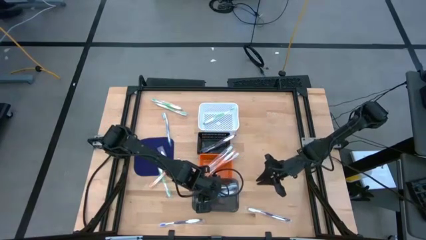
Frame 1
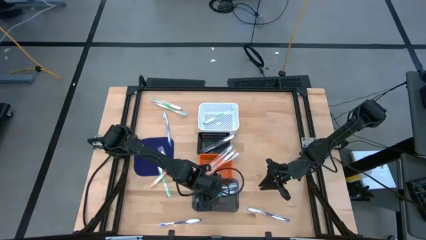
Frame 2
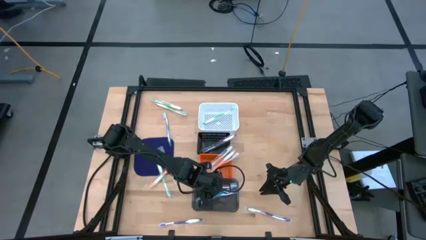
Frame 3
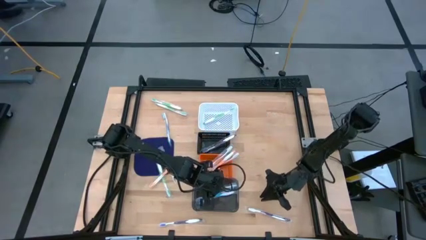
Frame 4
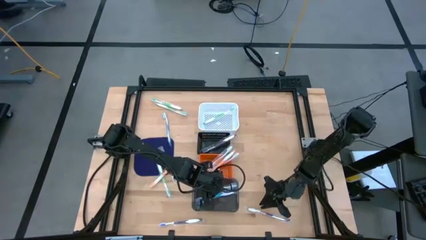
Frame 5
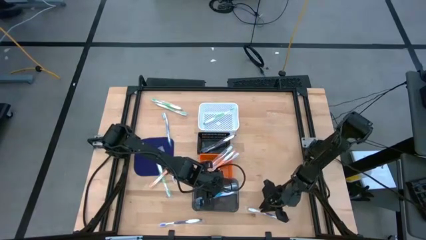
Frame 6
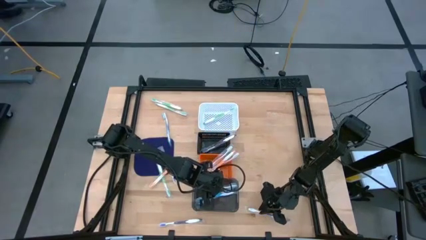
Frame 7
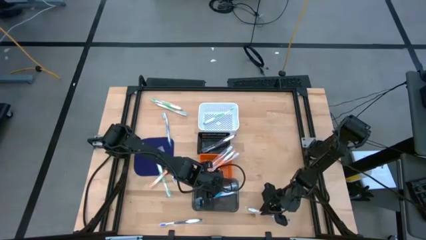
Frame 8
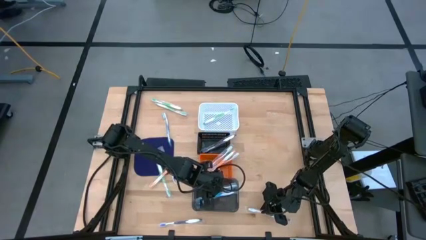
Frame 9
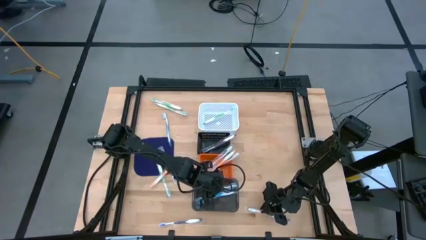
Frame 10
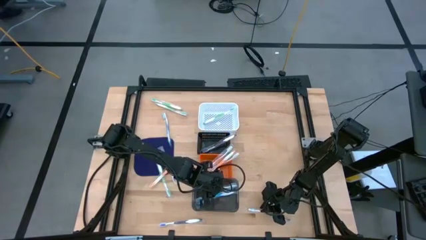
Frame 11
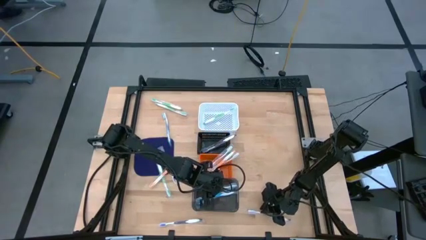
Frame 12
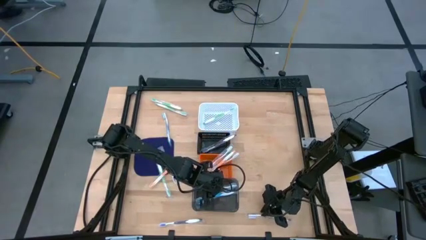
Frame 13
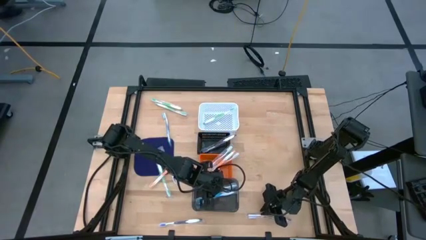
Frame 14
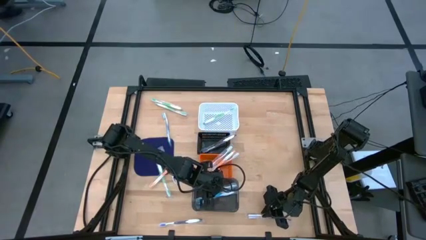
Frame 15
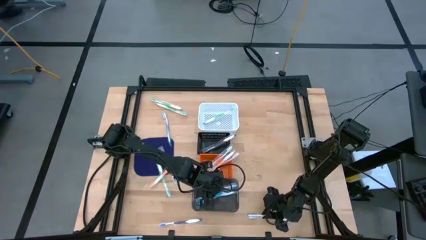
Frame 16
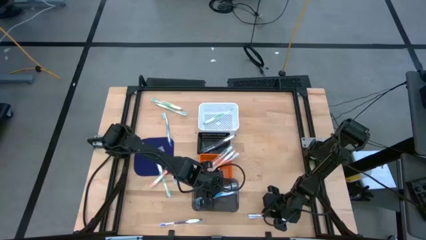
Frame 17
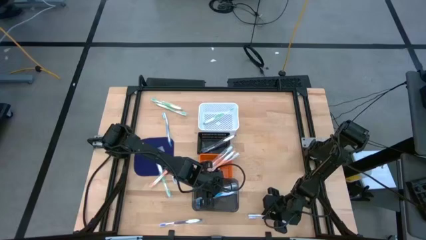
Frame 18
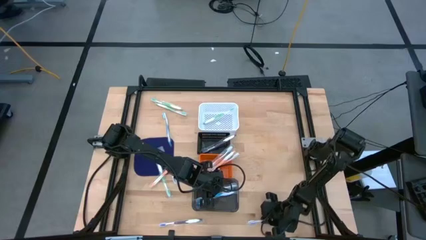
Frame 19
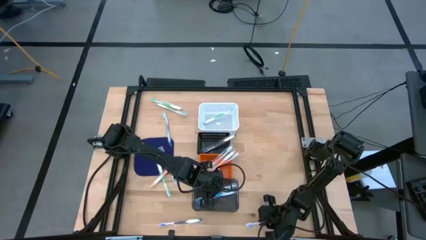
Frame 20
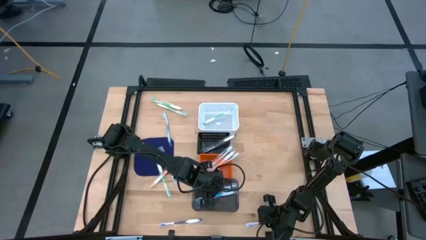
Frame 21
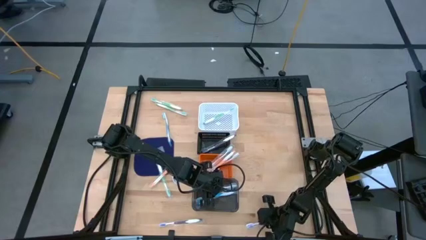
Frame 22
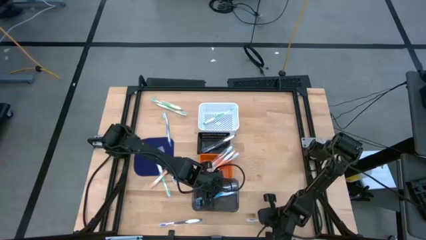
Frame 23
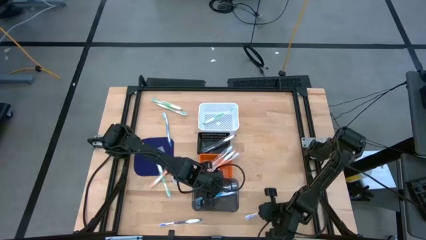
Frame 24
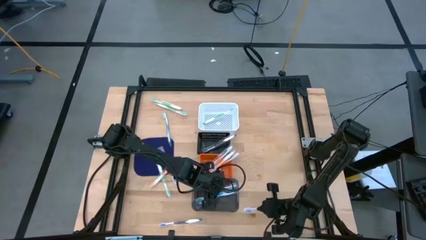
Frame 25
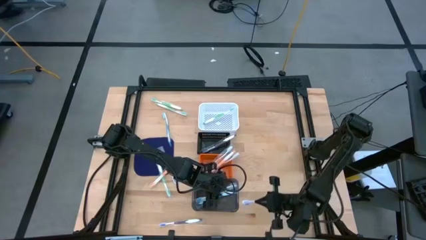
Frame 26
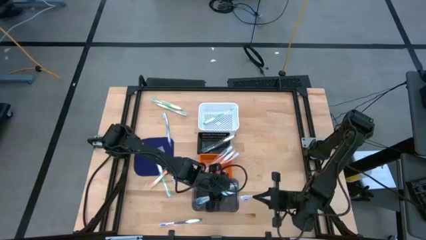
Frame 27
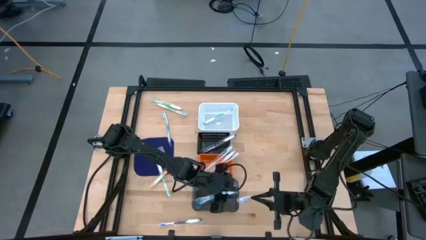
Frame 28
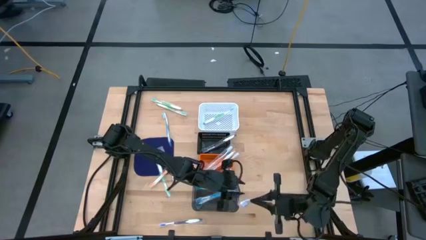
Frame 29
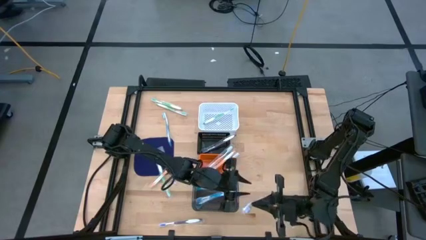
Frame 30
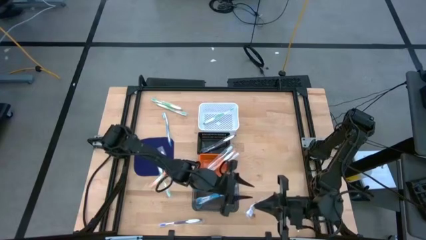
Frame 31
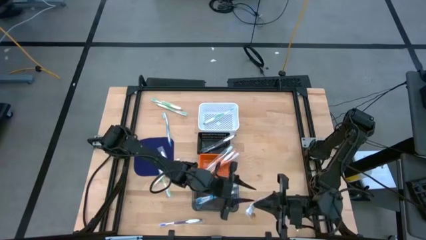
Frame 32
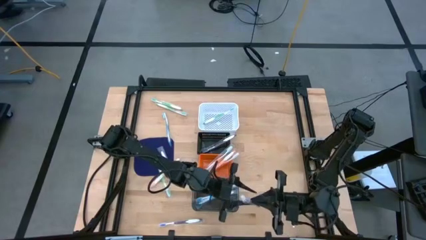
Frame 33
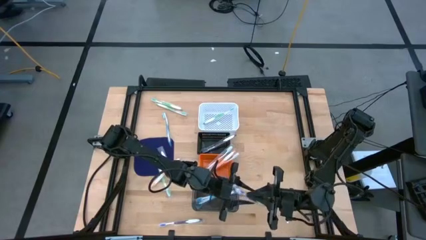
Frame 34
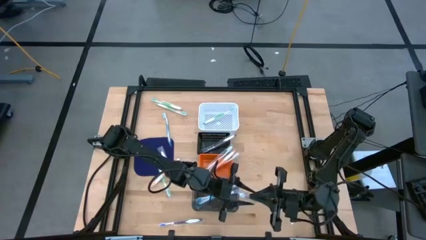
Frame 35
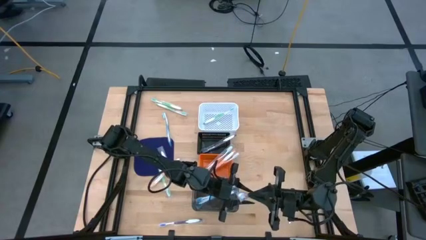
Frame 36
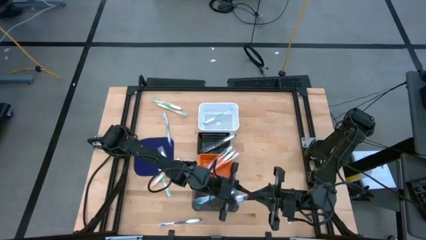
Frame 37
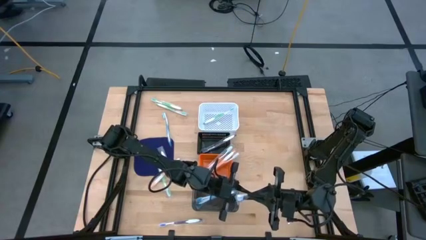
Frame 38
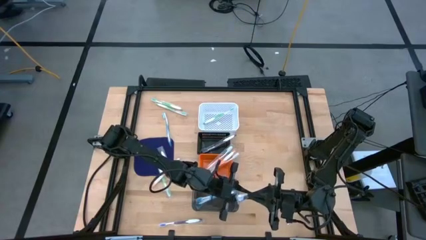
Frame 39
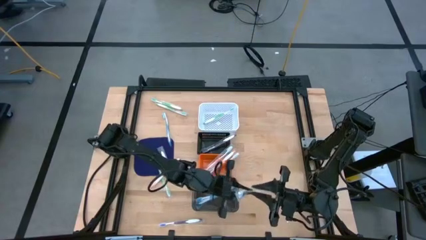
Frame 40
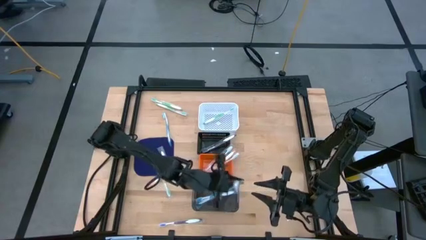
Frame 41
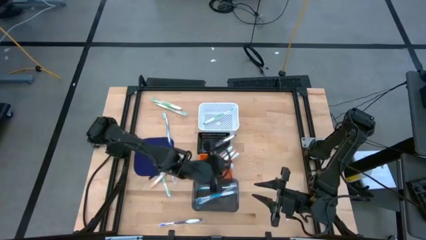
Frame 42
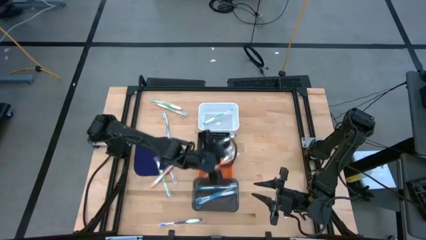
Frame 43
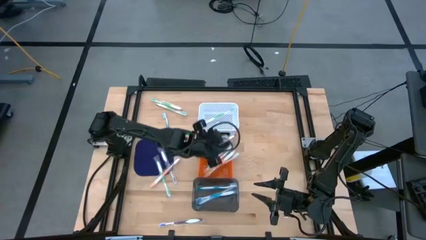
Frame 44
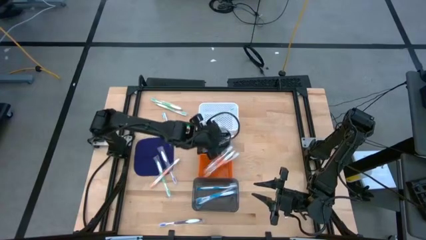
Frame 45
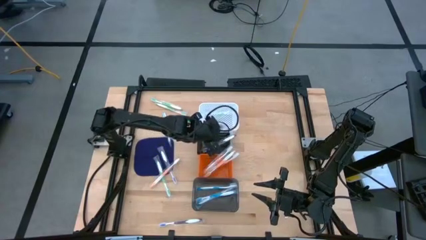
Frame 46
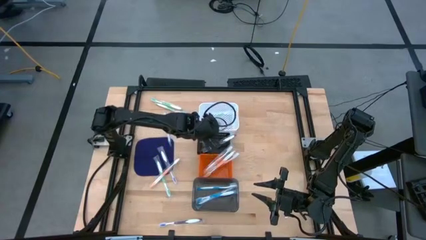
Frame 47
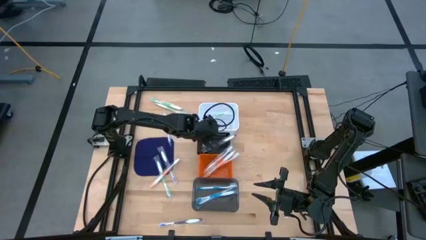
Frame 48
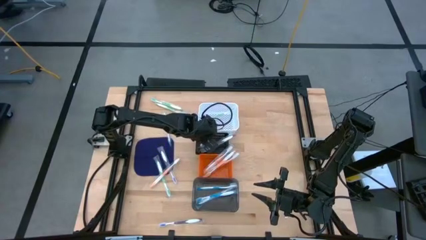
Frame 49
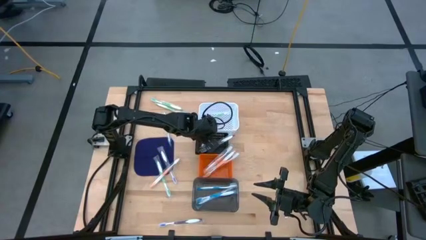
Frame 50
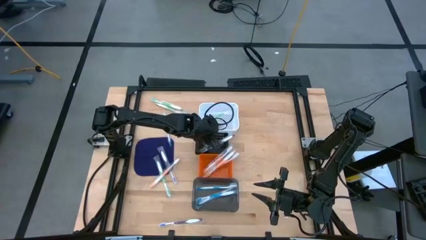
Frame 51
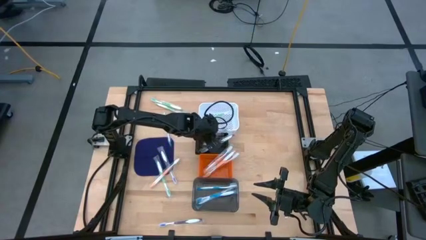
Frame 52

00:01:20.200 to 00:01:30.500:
Task: Pick & Place Toothbrushes
Put the bottom right violet toothbrush into the black bin

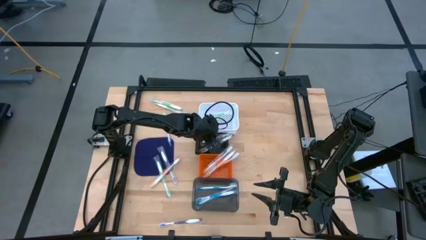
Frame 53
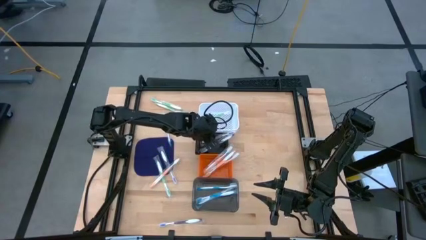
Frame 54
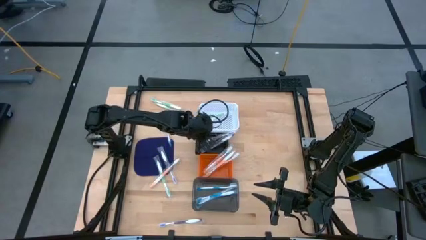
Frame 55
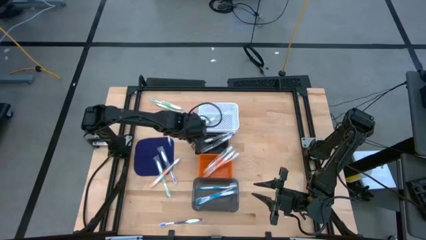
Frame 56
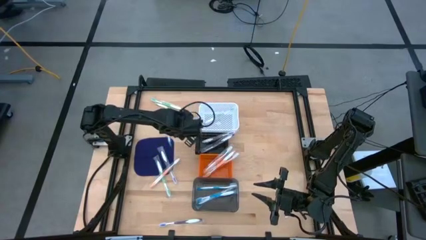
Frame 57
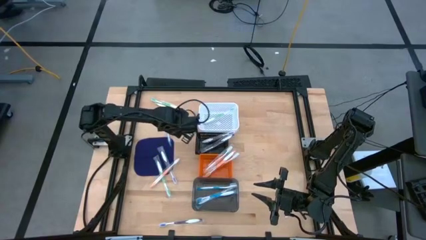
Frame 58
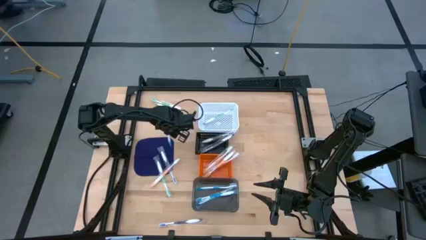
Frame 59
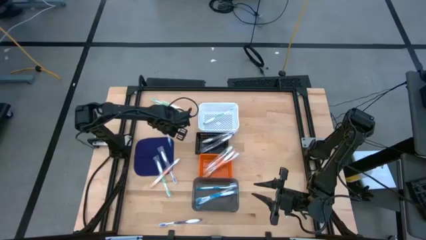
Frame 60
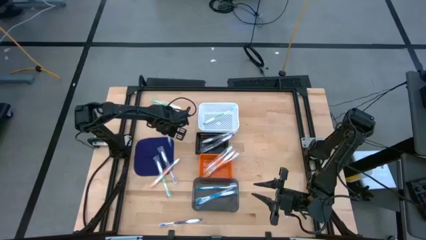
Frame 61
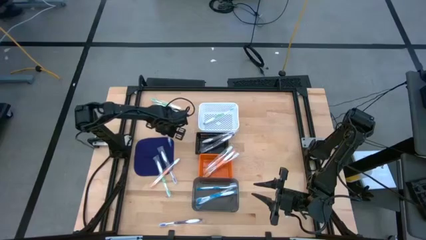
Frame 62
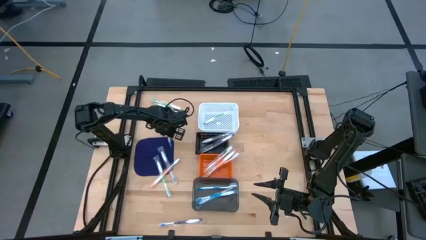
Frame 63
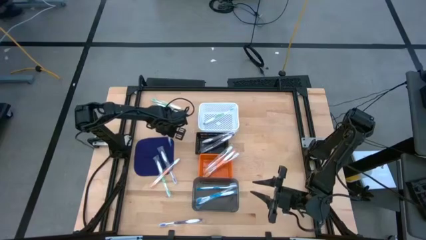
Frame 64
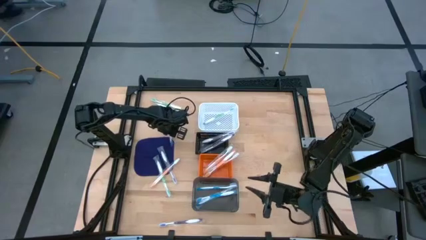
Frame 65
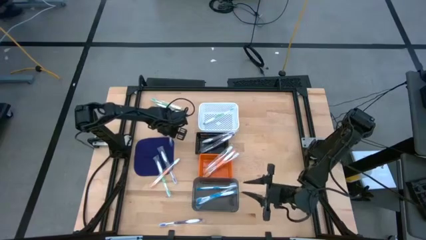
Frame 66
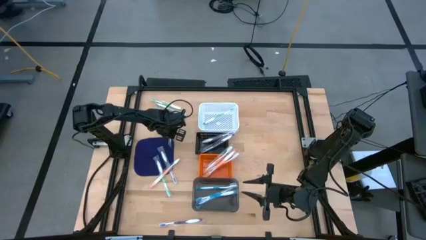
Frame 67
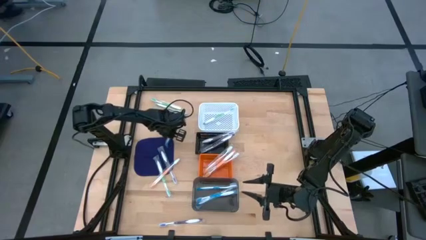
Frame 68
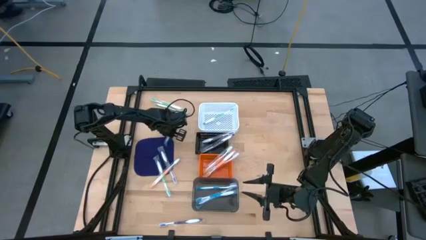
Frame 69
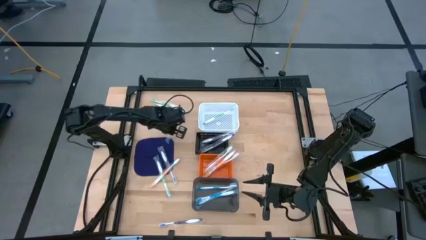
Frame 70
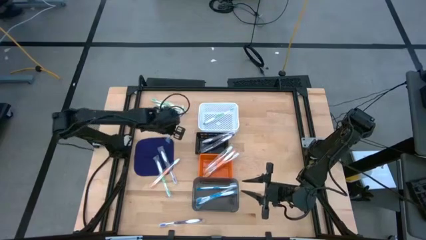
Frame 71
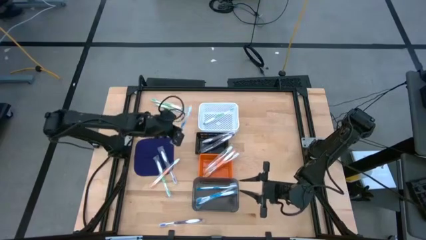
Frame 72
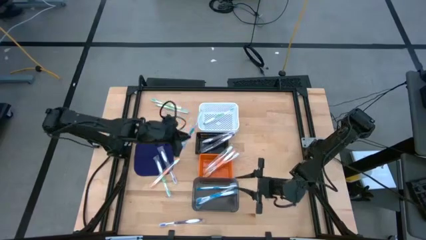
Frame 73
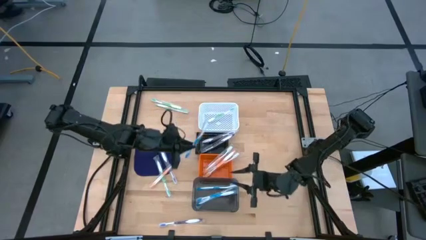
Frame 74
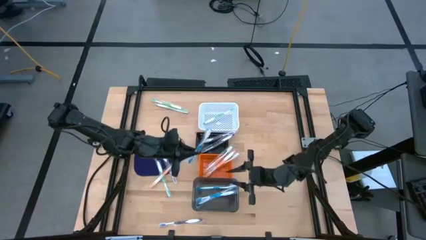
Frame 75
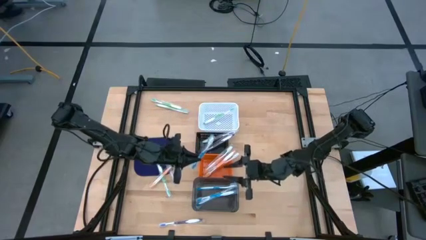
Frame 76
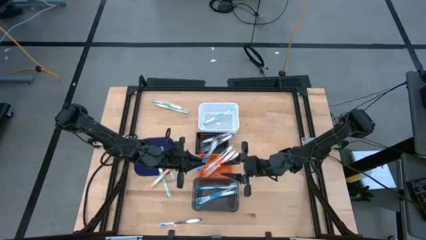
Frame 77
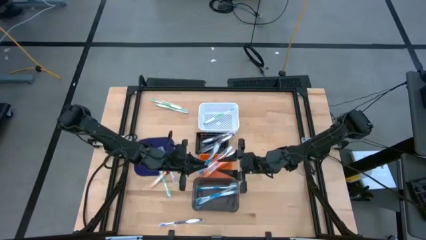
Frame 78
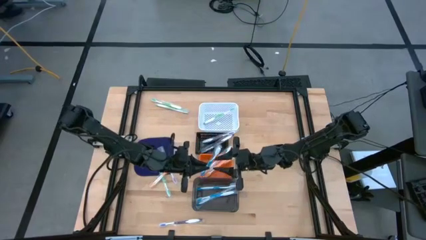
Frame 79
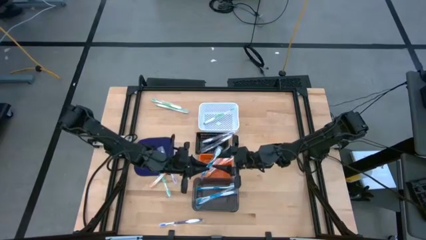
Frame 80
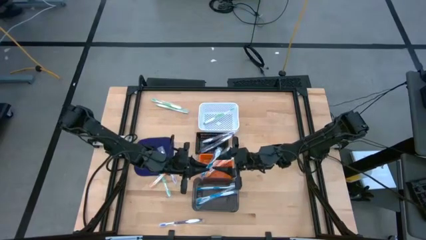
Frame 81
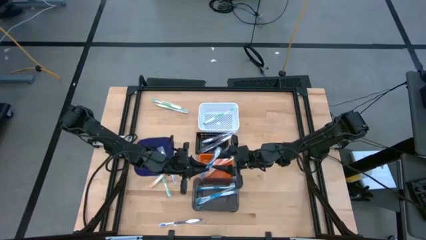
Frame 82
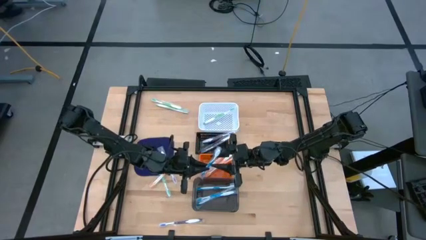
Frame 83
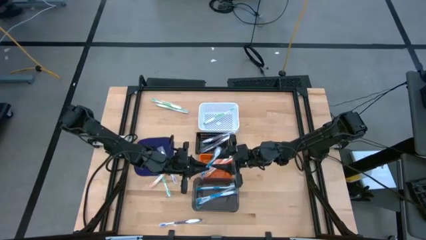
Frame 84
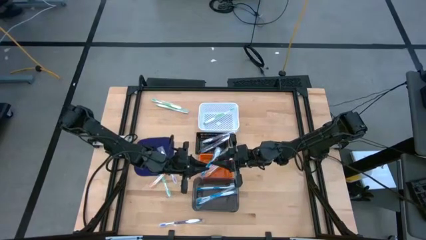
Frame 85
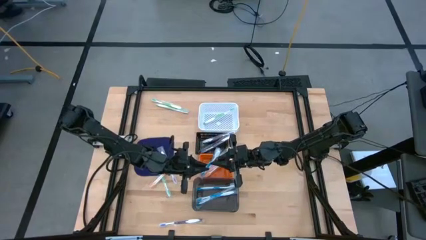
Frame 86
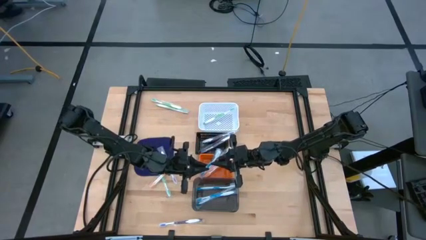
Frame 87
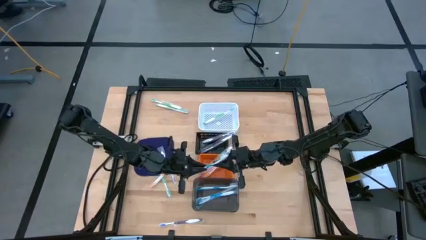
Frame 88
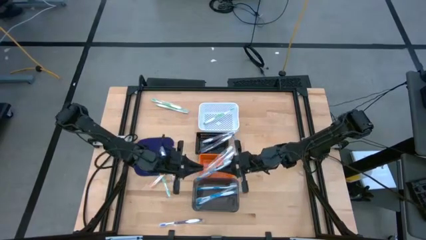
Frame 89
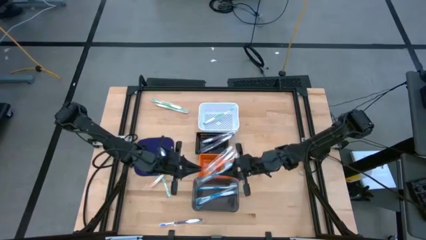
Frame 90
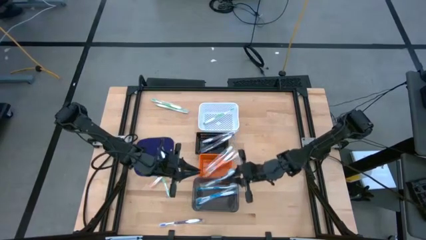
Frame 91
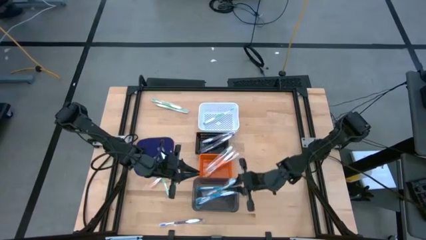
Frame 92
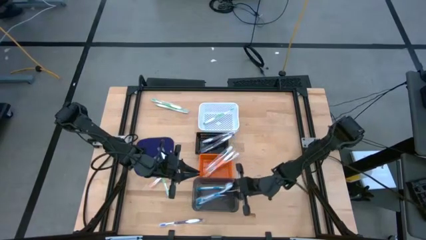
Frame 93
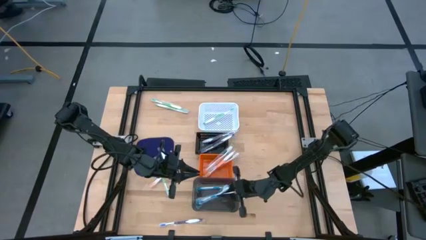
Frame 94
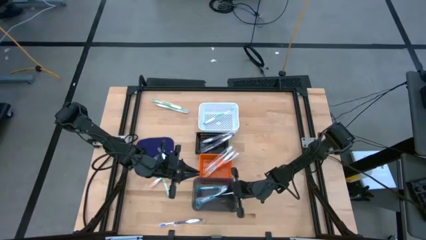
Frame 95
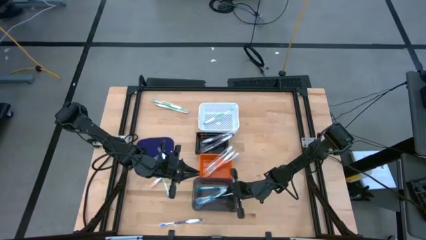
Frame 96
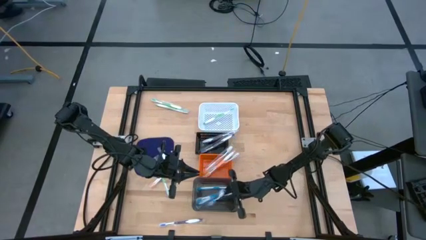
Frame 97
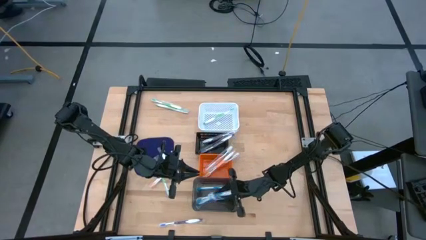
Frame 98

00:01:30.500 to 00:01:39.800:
Put the blue toothbrush into the black bin
